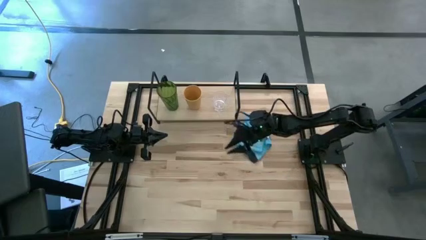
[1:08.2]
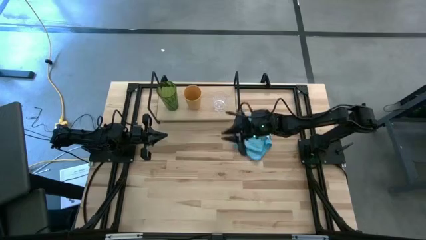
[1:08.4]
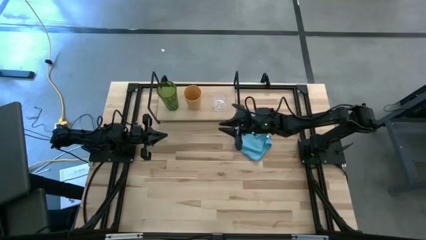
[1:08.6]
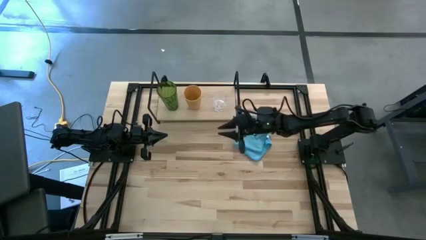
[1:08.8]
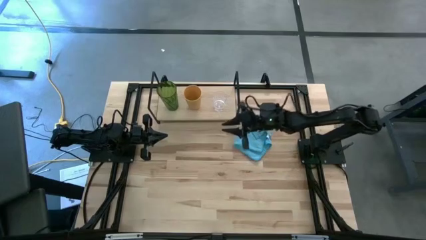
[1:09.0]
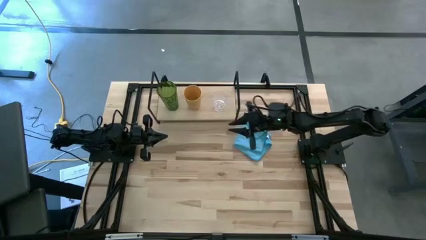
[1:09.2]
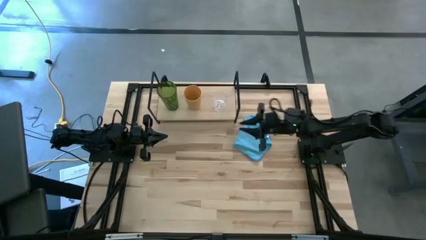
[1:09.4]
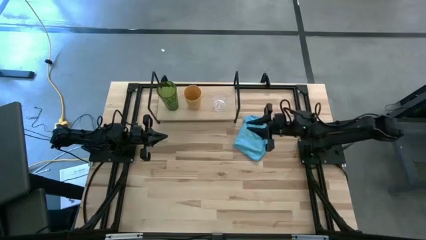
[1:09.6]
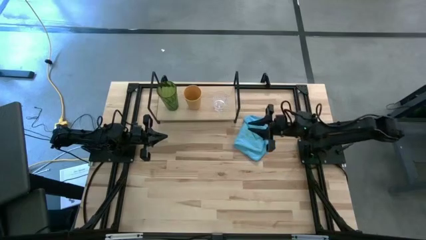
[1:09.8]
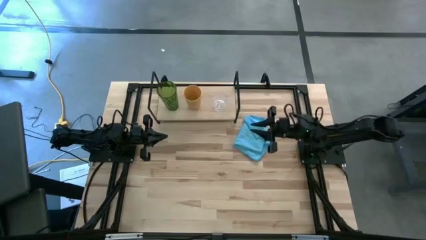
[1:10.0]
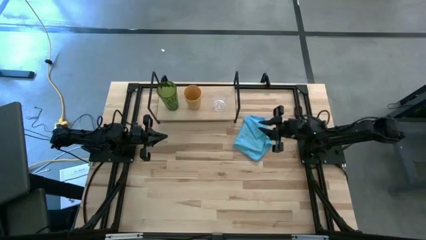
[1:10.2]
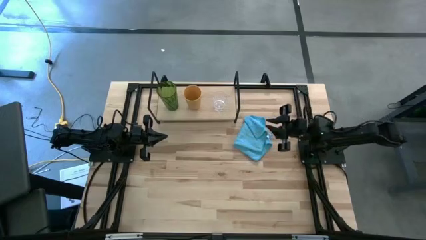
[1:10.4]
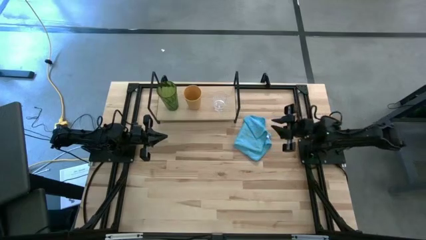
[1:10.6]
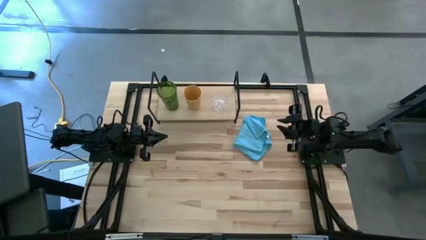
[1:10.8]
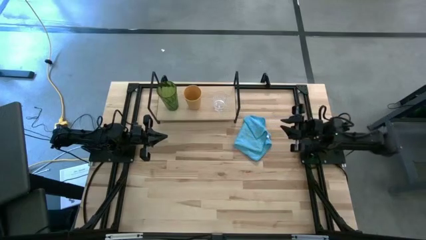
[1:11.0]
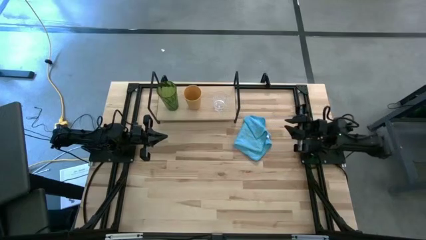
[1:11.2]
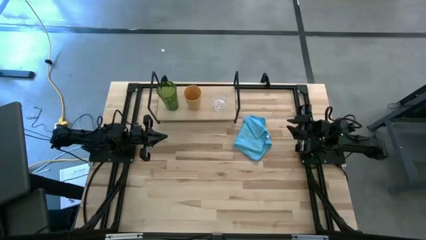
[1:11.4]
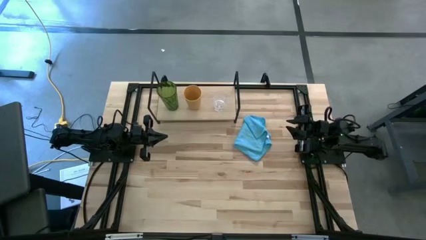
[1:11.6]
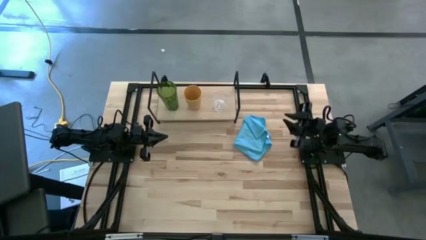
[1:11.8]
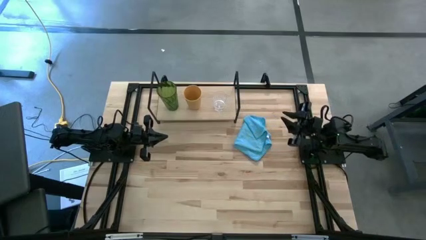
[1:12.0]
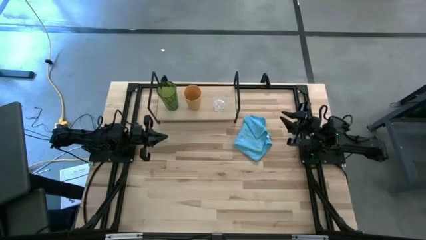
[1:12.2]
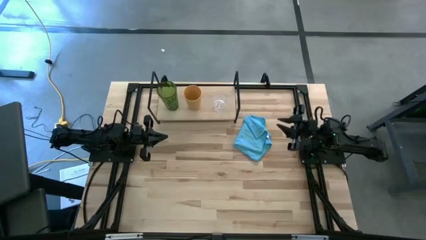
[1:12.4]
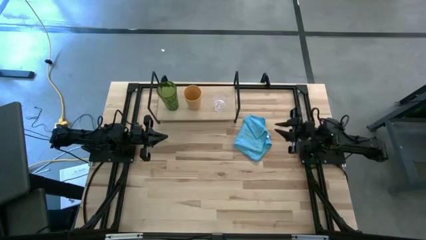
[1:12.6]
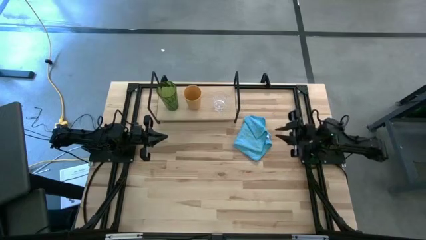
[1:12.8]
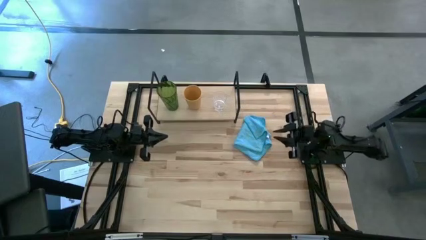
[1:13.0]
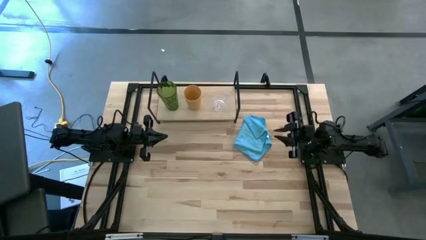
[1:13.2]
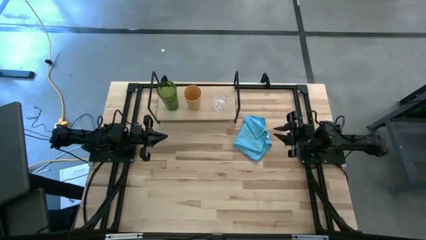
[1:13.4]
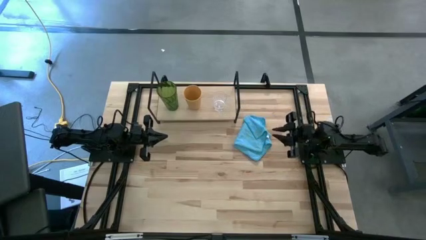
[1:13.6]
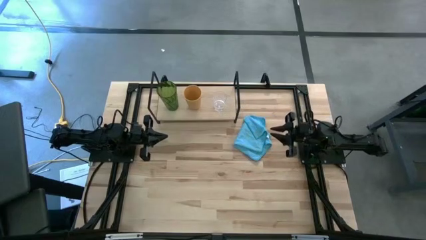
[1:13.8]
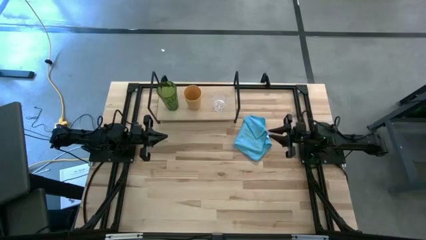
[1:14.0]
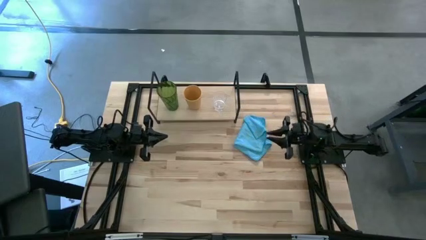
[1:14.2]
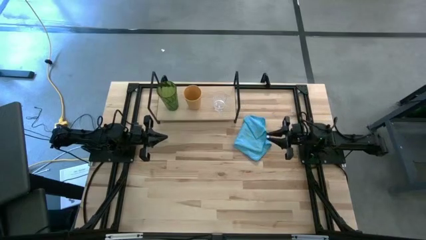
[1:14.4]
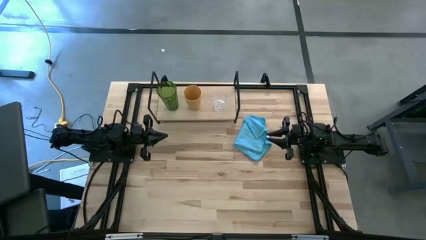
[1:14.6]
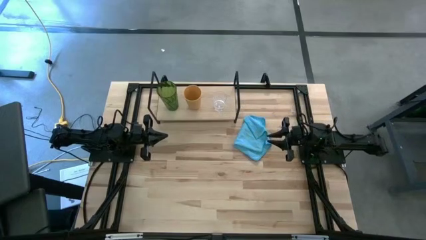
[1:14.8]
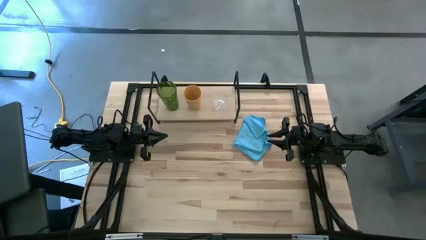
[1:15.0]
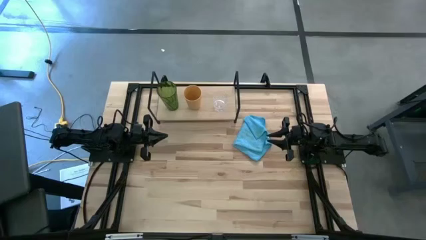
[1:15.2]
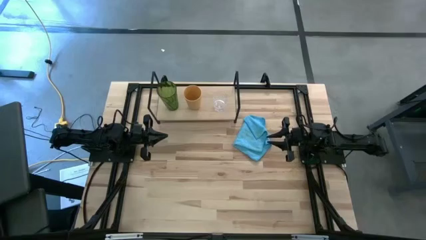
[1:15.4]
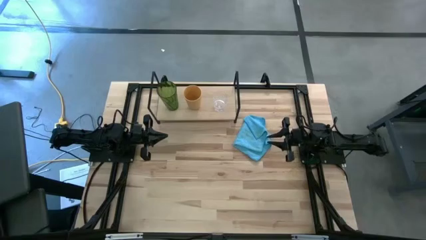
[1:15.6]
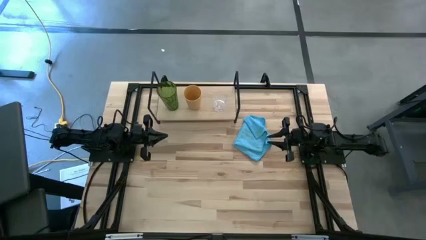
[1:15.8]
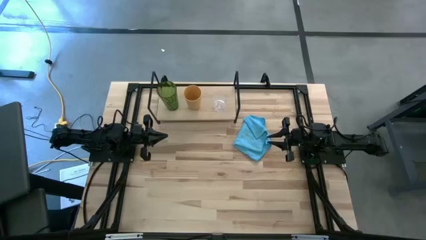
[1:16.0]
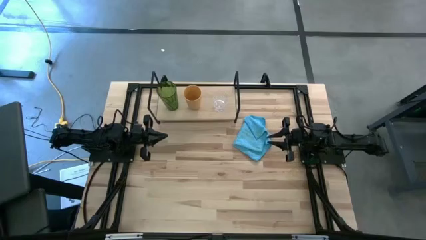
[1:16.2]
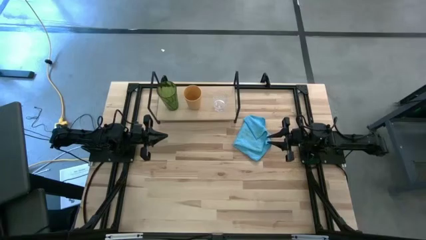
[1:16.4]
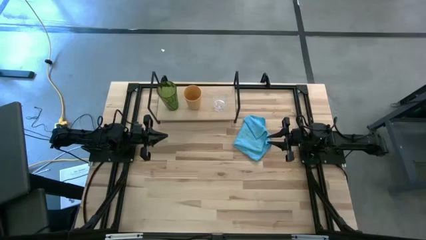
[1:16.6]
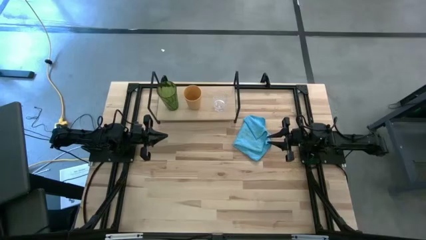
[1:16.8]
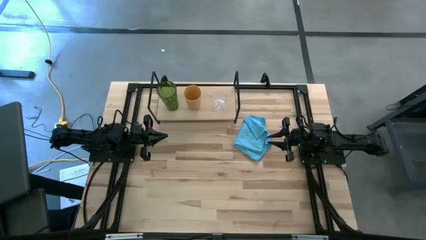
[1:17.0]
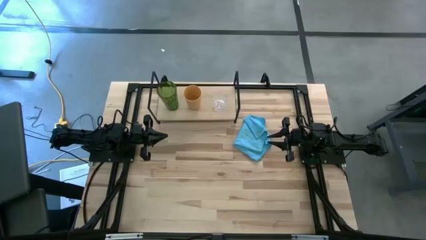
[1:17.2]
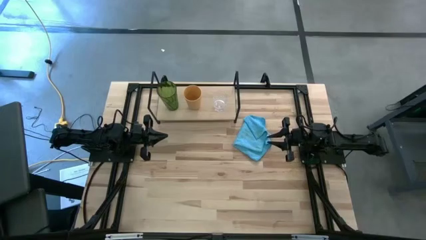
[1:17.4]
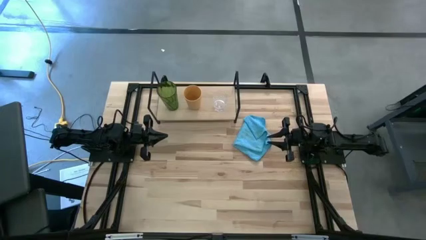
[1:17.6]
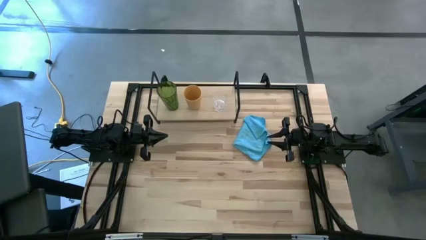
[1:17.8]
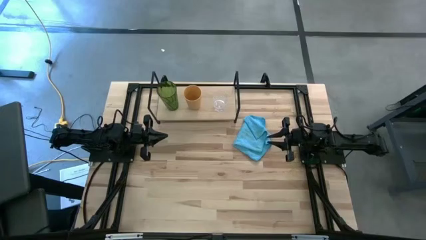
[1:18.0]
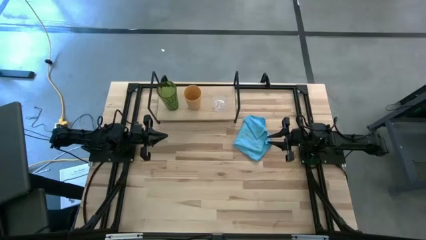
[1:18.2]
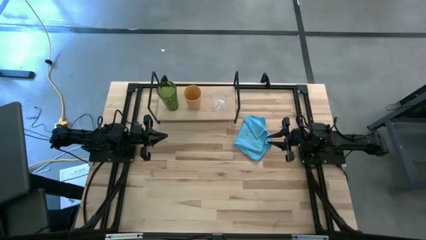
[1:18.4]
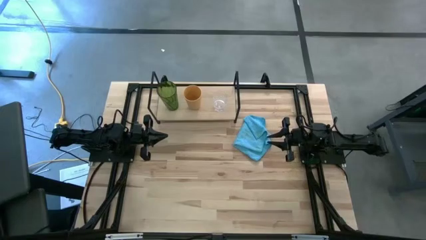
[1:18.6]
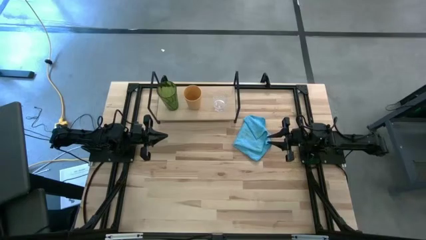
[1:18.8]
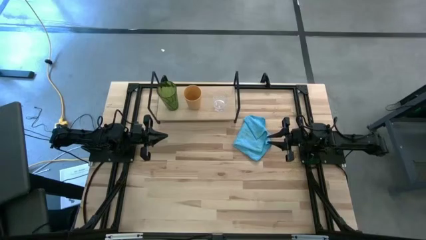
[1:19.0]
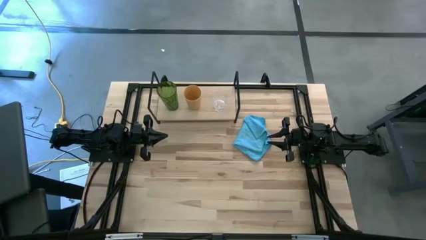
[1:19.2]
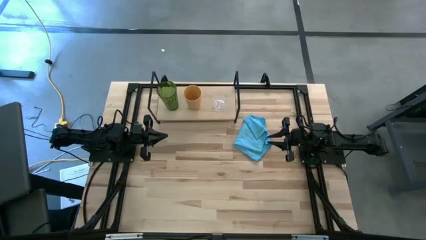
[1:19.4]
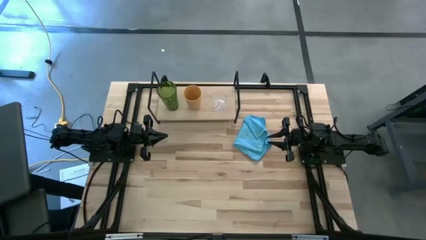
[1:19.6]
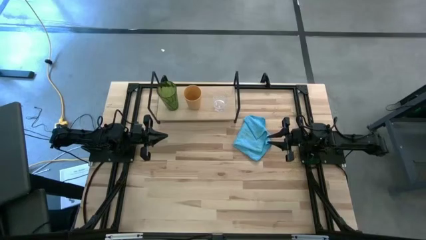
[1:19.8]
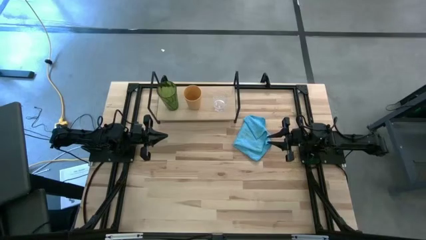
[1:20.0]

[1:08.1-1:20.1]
Task: Stack small to large cups/mugs on shelf
Return to Home Position

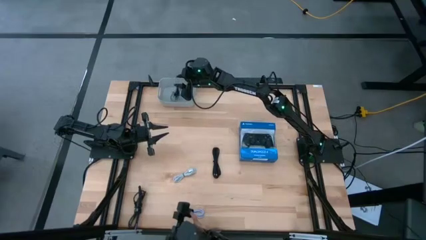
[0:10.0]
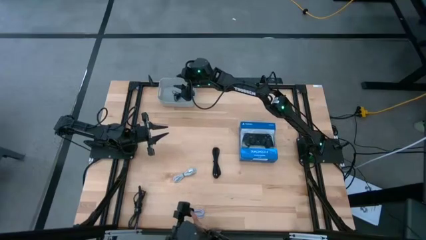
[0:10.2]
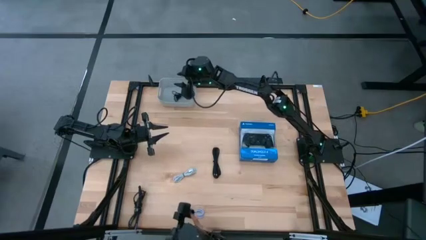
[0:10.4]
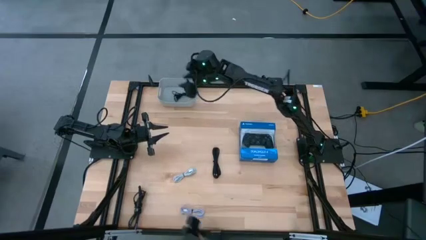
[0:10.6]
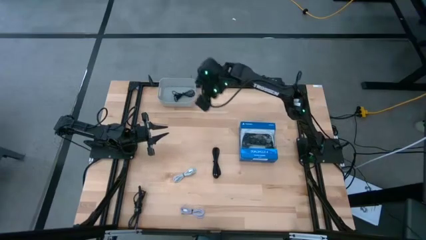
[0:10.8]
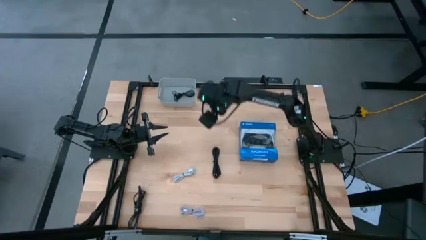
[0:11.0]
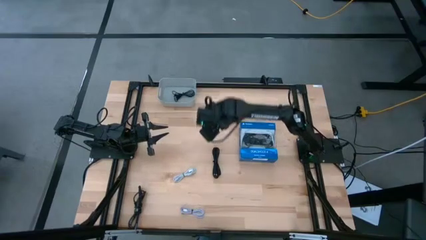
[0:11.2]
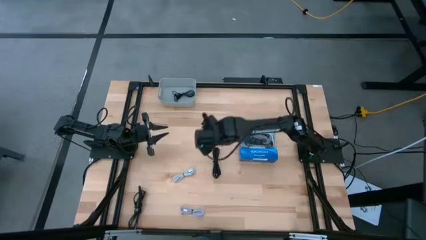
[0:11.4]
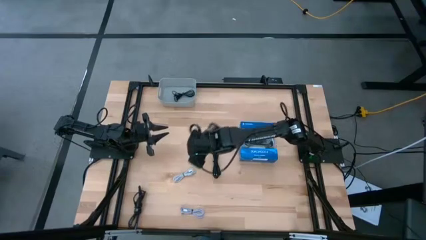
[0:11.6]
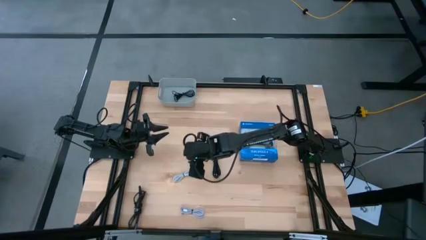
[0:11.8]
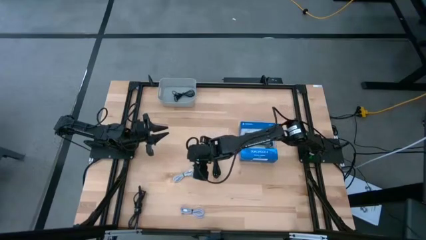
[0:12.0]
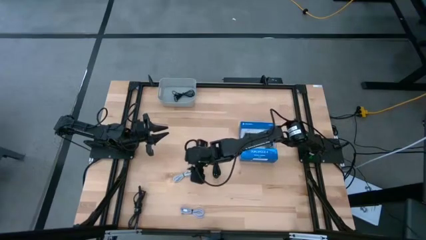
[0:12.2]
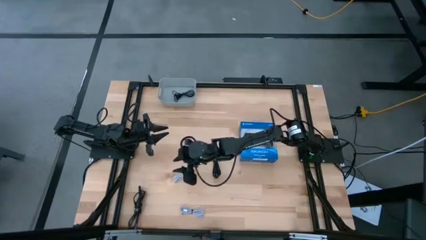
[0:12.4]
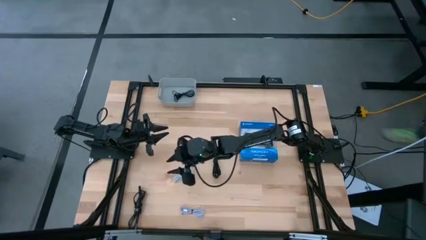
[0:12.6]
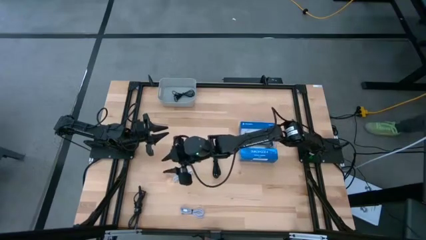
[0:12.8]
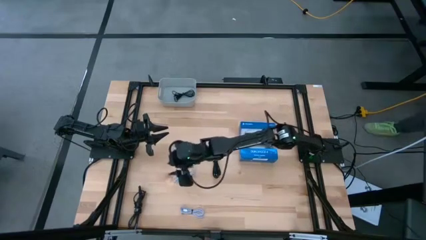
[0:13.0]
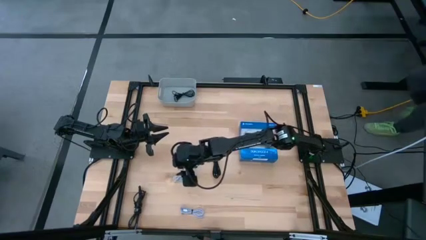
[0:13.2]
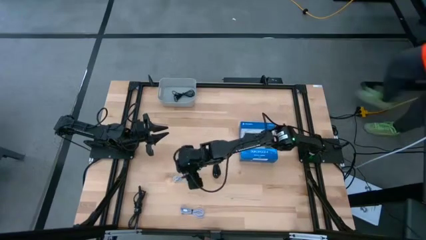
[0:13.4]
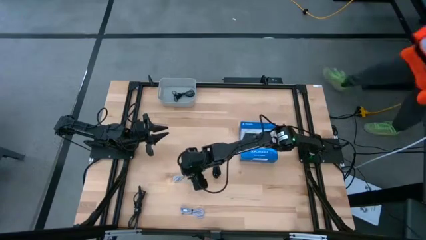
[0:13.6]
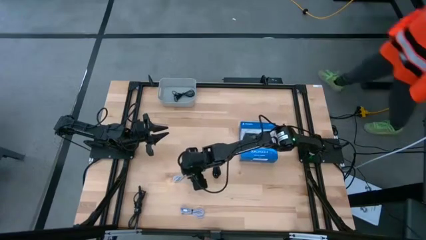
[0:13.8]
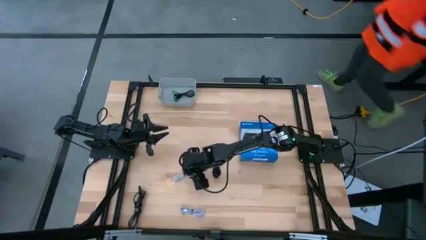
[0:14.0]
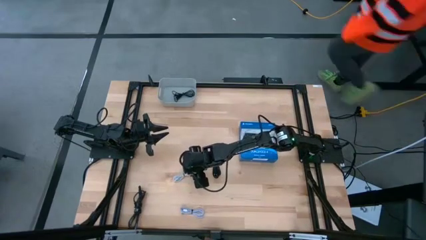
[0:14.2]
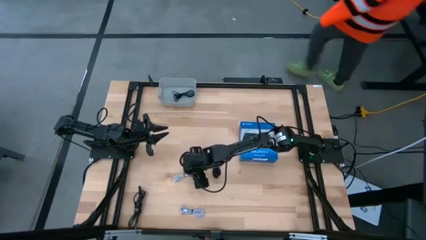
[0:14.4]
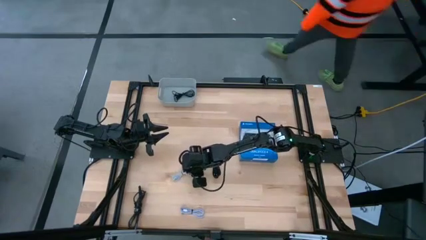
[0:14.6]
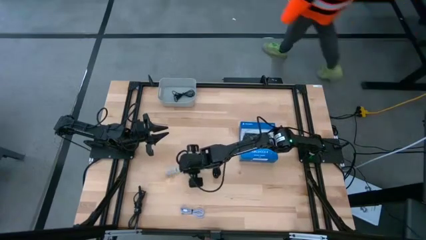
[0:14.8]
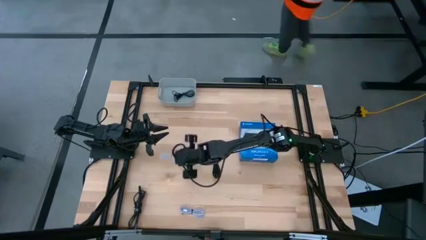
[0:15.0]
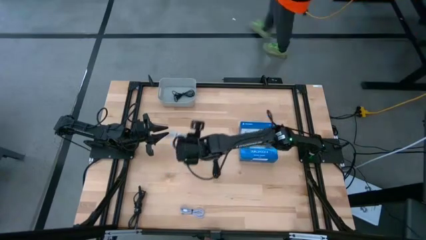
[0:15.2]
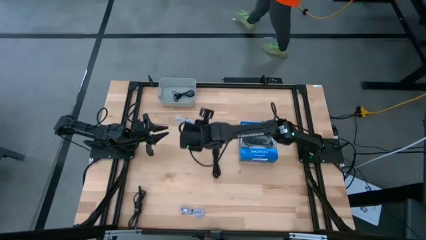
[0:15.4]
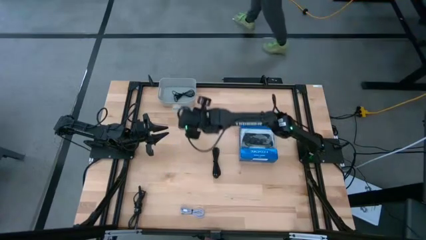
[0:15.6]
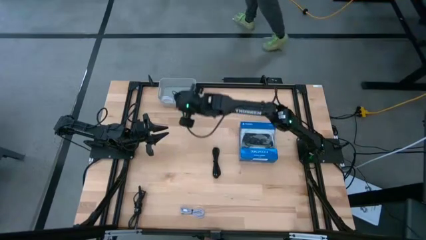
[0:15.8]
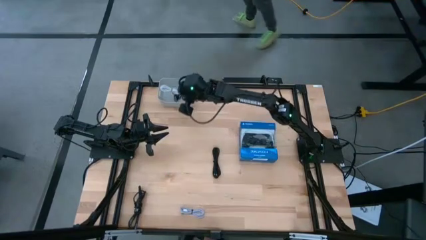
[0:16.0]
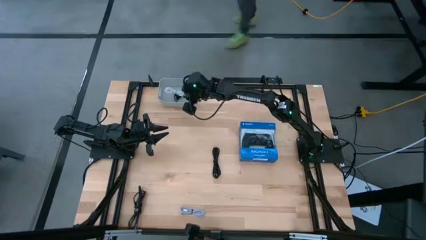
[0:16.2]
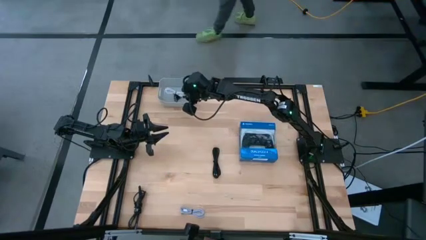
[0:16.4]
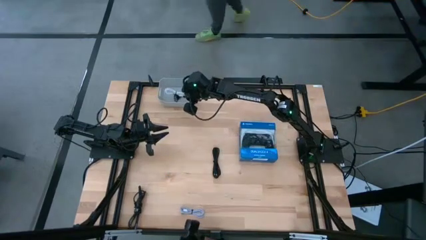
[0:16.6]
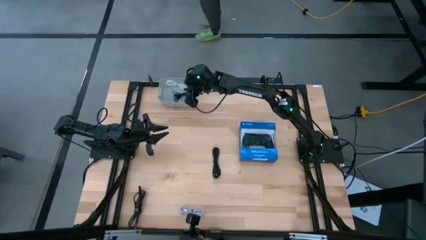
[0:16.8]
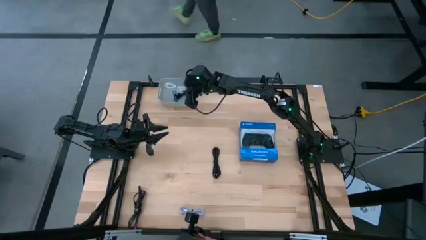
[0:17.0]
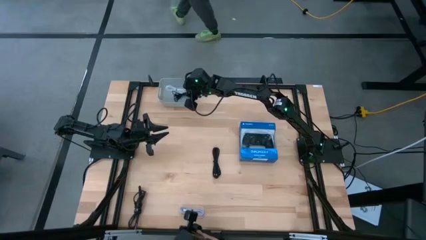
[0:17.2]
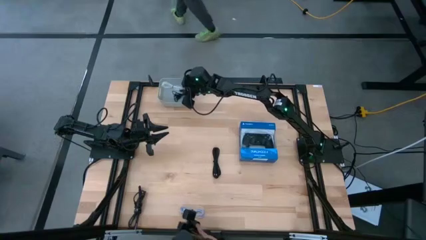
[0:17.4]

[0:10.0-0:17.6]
Task: Pick and place USB-C Cables
Put the white charger cable into the gray bin
